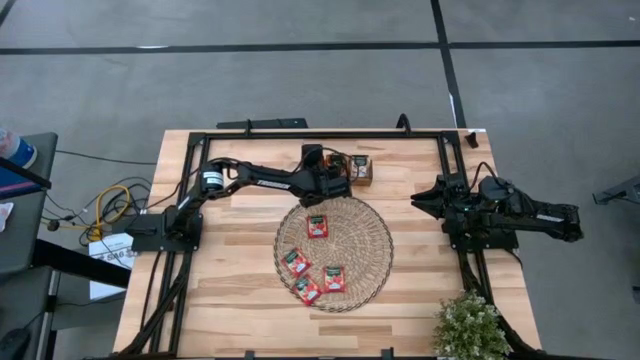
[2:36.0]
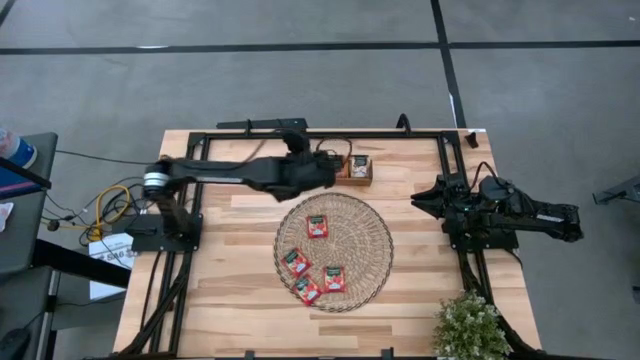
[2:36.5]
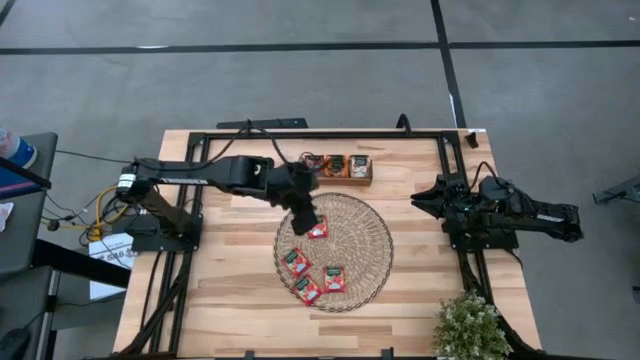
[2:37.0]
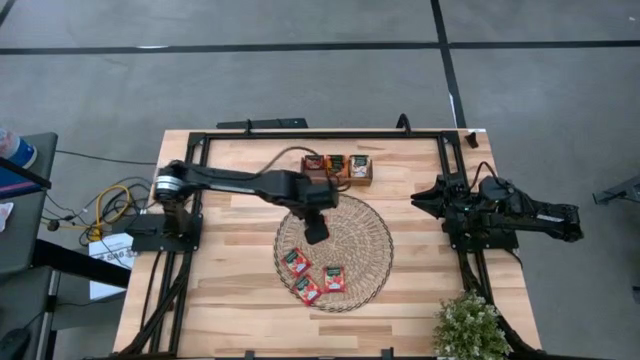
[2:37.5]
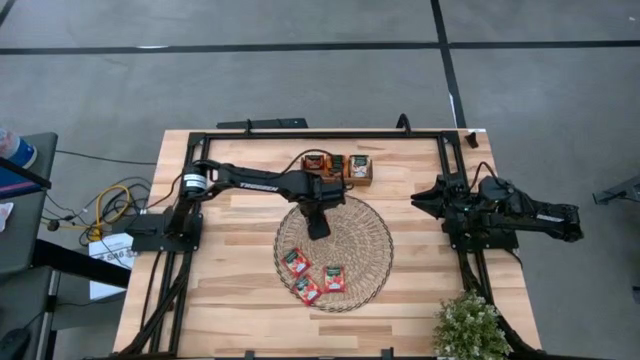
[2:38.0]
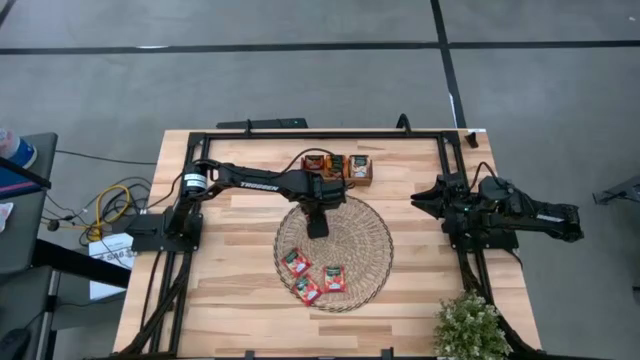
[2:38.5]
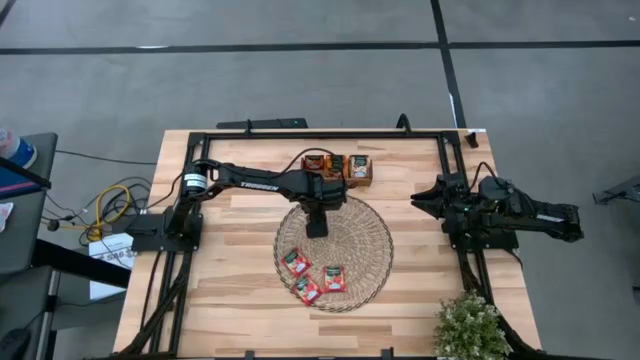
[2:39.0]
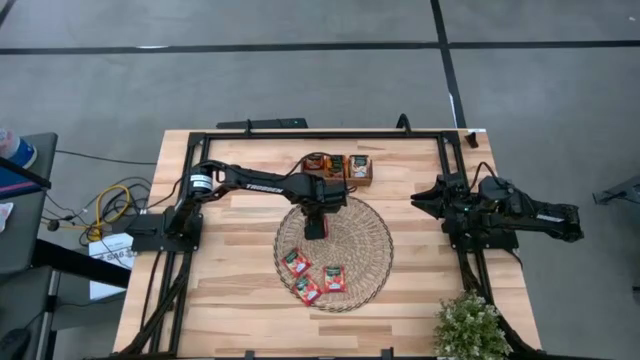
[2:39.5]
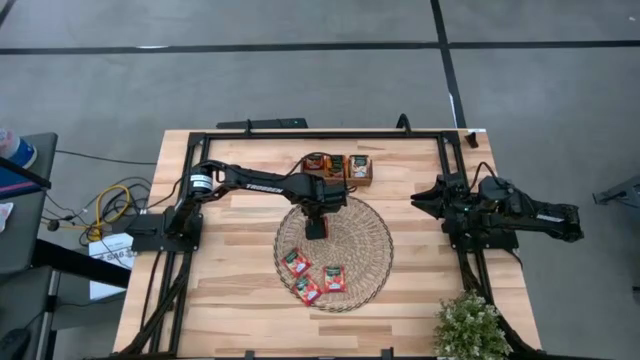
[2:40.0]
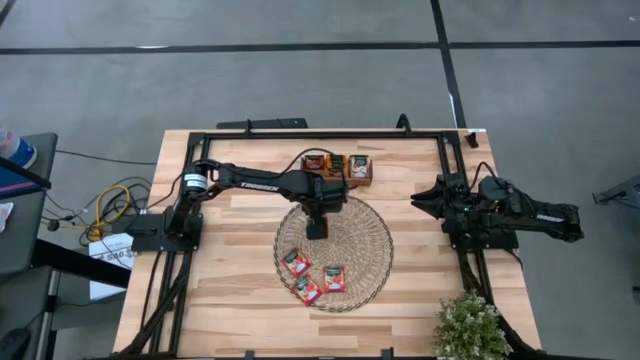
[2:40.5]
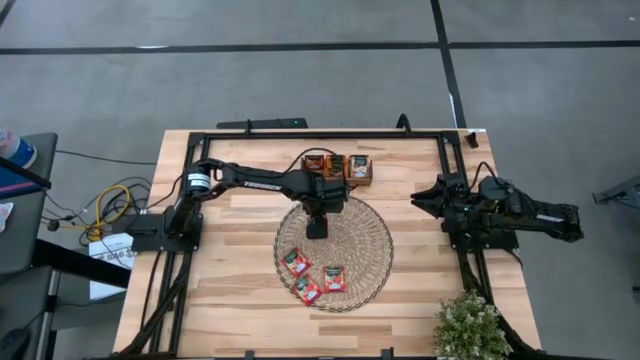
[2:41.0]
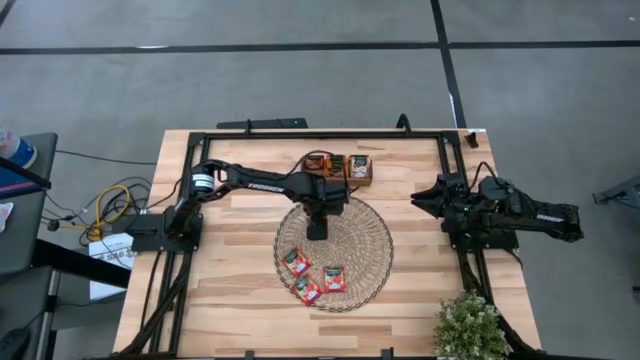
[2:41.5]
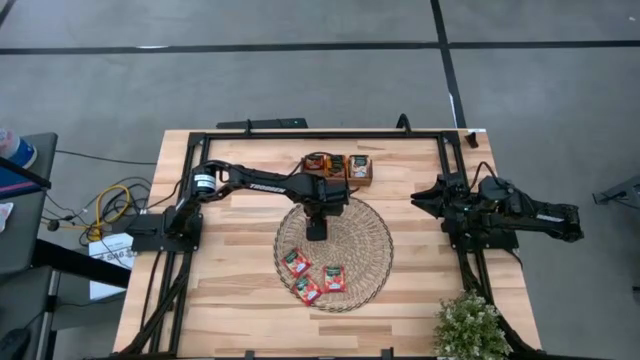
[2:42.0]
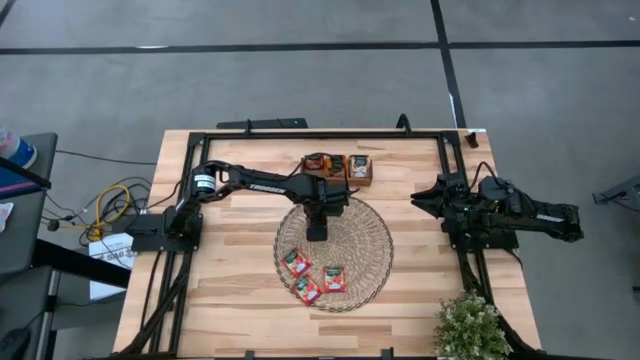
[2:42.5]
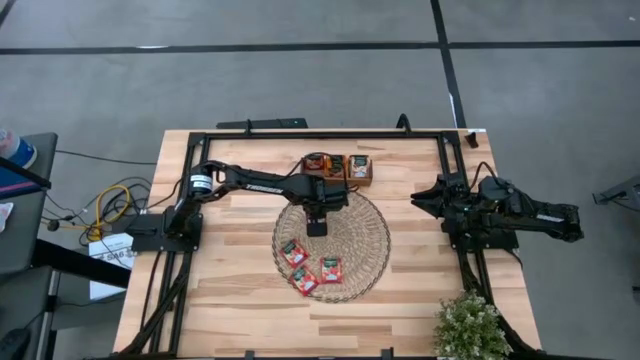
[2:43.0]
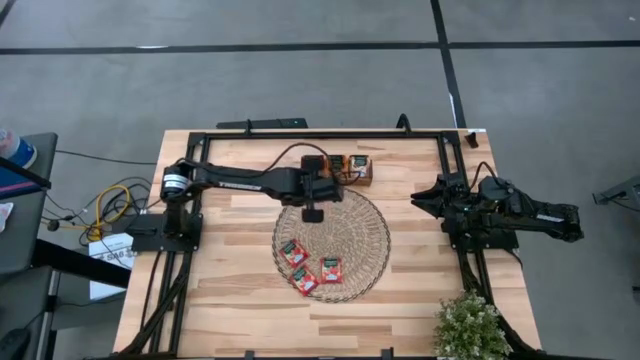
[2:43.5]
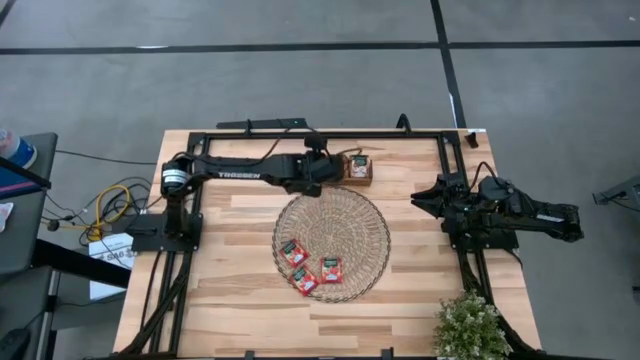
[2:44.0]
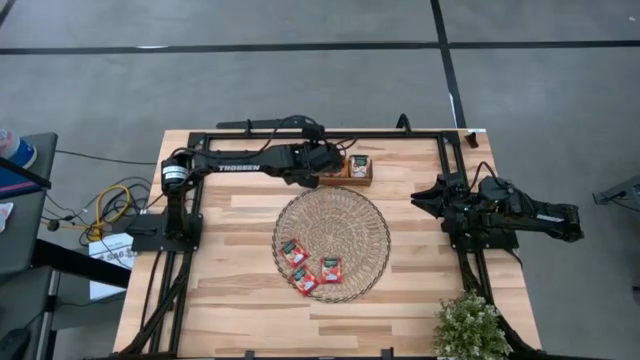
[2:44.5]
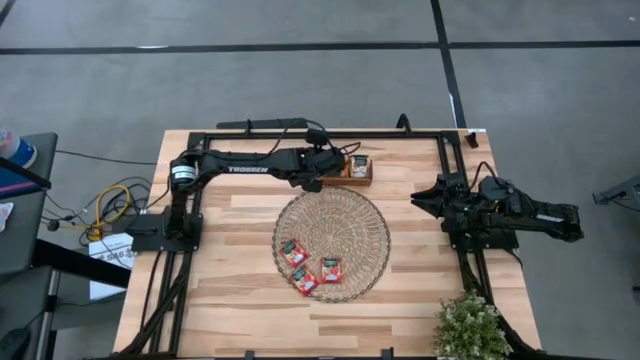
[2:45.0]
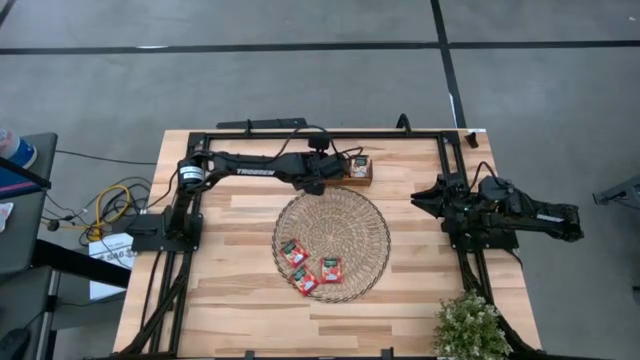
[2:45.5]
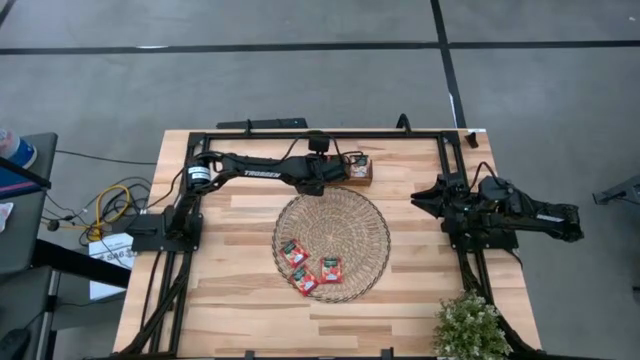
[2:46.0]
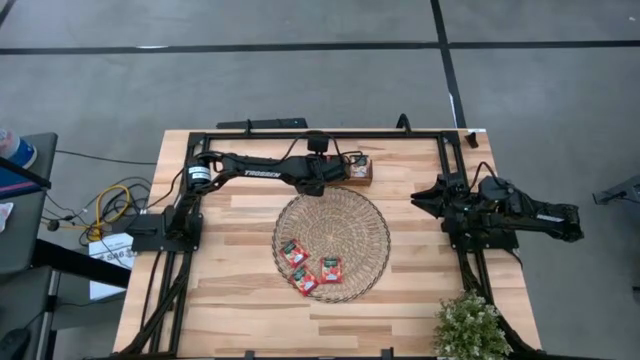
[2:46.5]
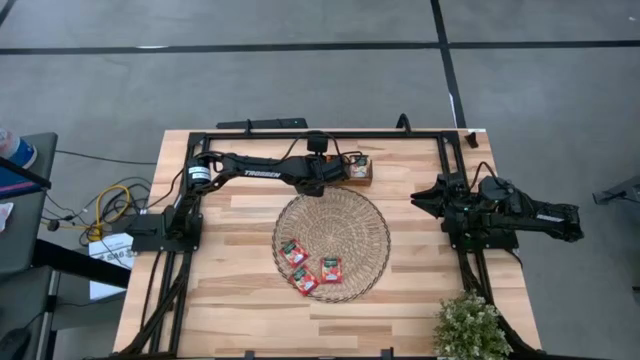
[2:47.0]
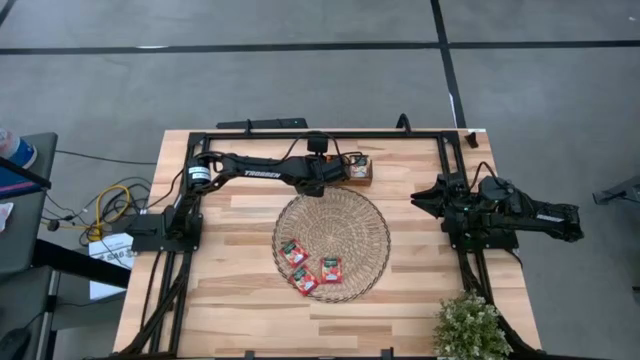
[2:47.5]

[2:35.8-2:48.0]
Task: Pick & Place Tea
Put the red tea bag into the left slot of the wooden organizer

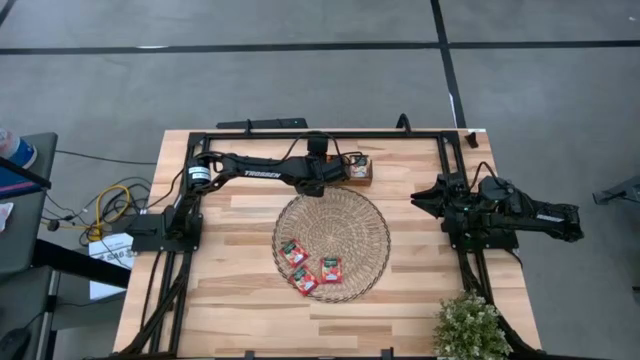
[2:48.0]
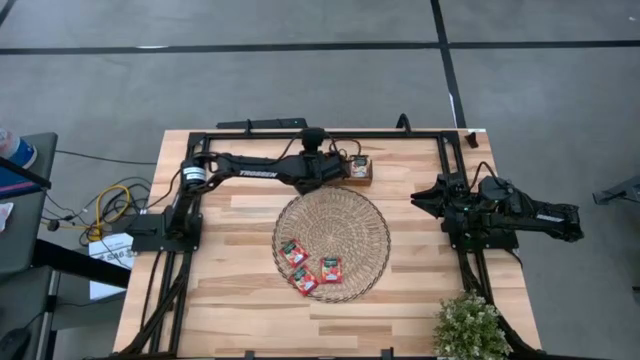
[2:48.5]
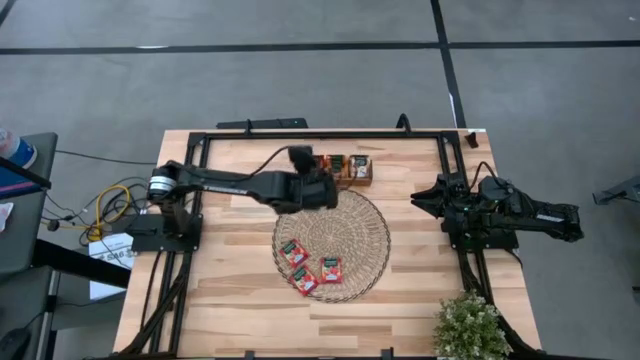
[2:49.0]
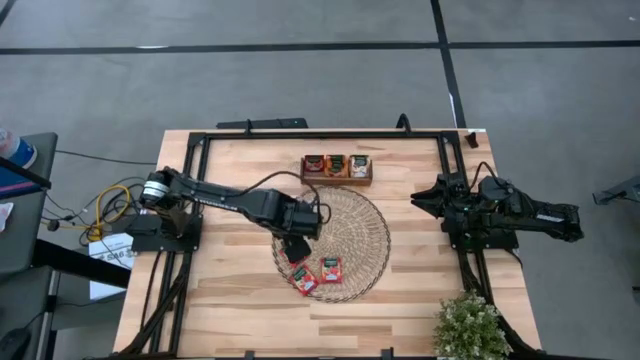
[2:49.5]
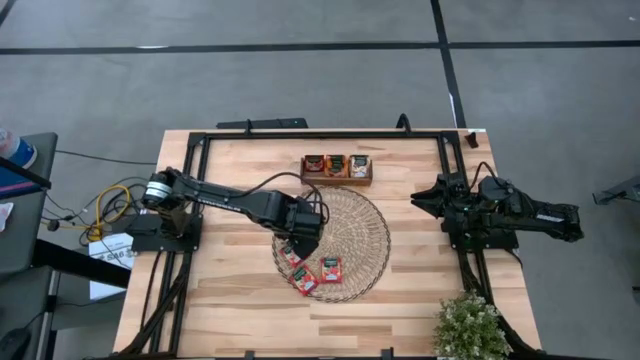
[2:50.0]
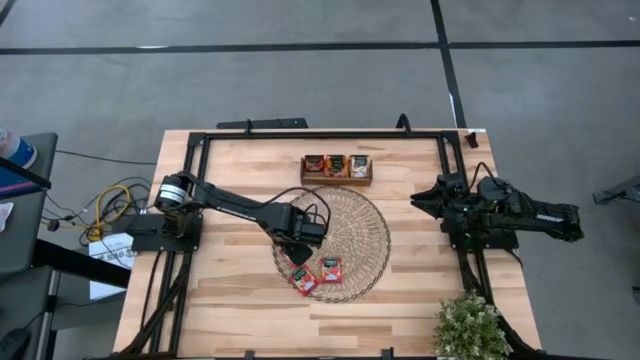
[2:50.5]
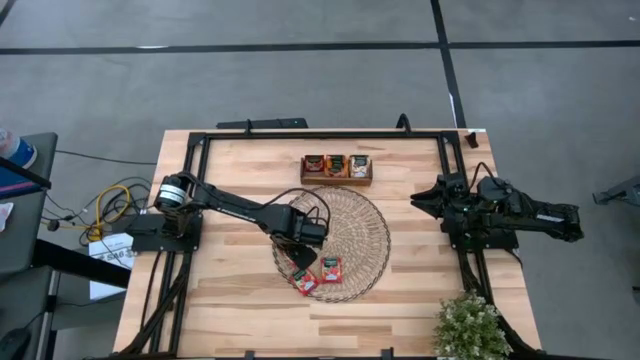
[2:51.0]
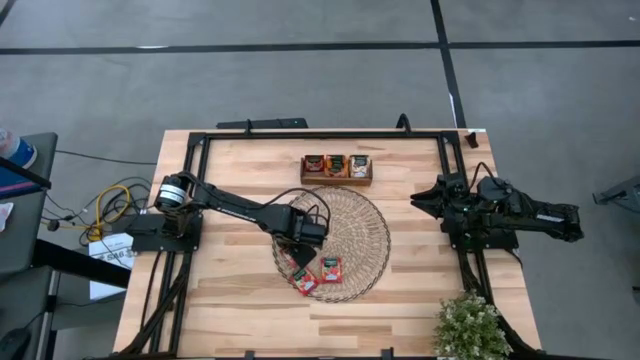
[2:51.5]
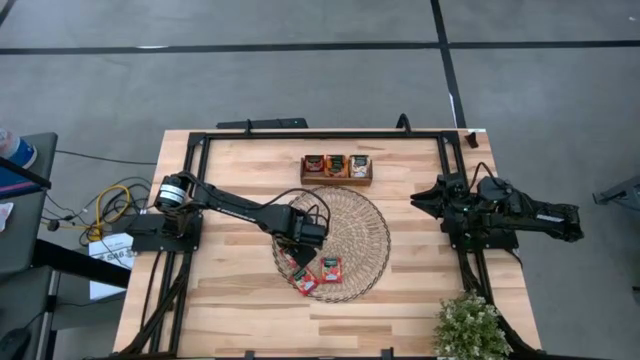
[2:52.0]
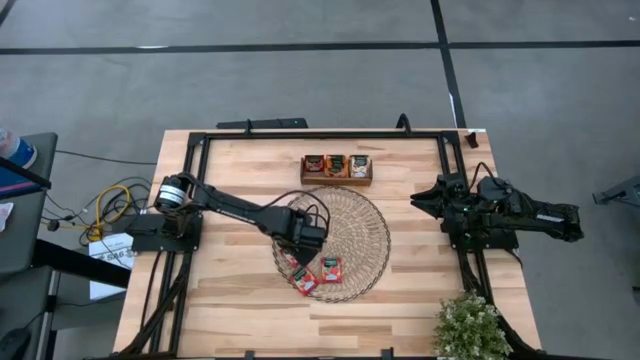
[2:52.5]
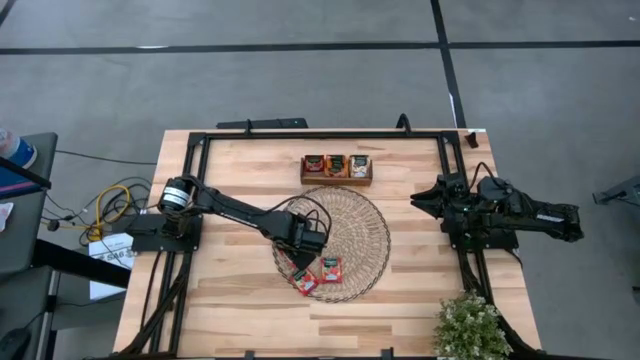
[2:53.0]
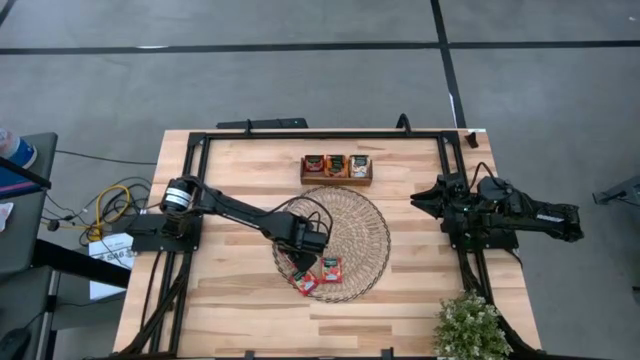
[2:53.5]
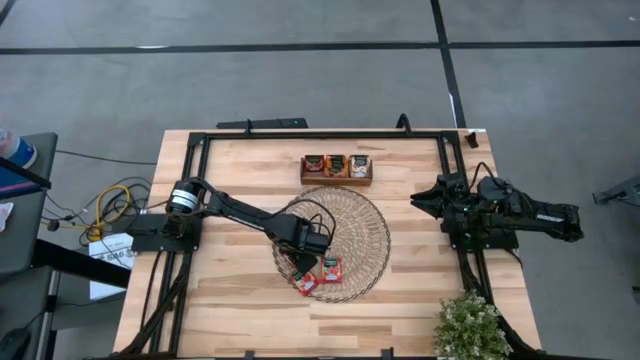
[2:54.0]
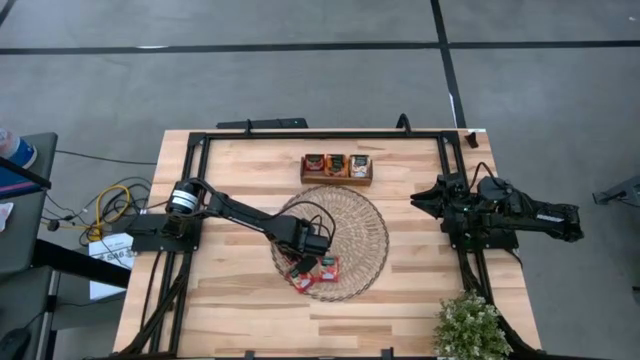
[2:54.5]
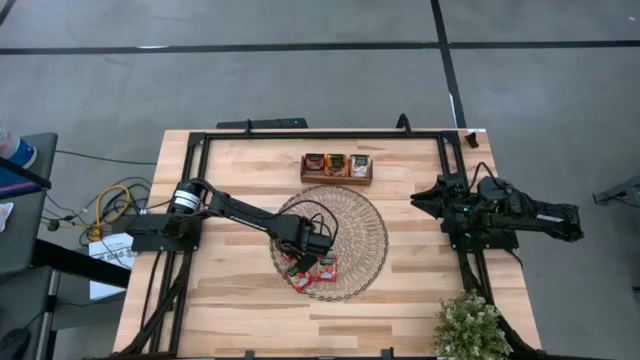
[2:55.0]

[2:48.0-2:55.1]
Put the top red tea bag into the left slot of the wooden organizer

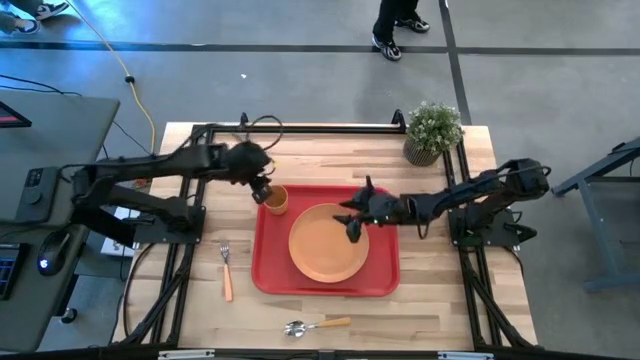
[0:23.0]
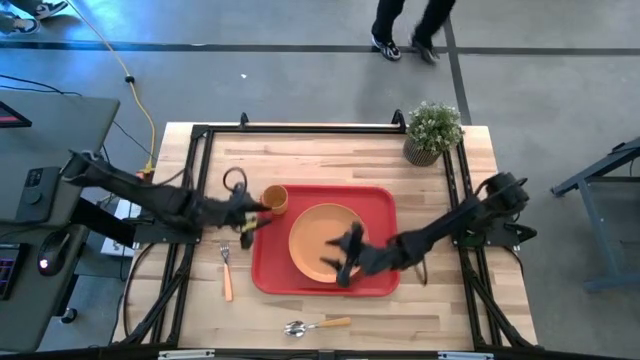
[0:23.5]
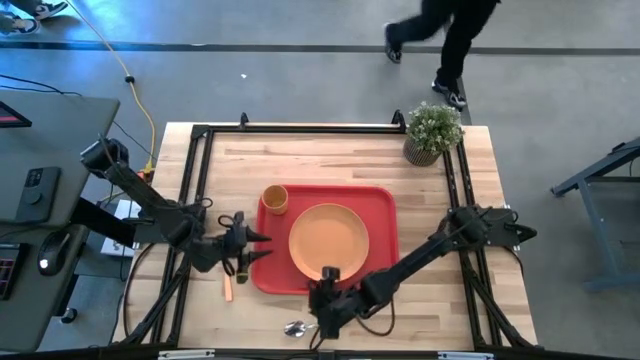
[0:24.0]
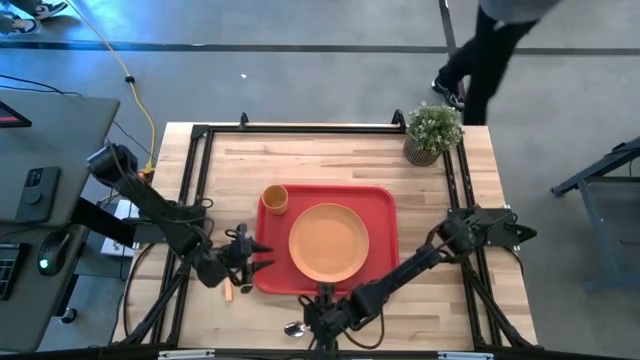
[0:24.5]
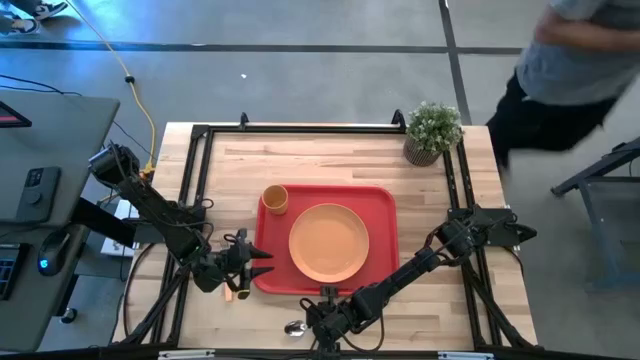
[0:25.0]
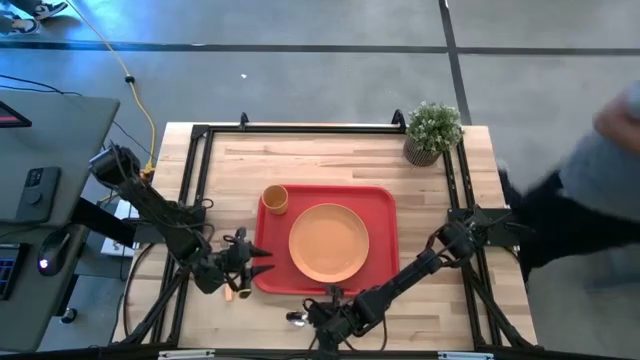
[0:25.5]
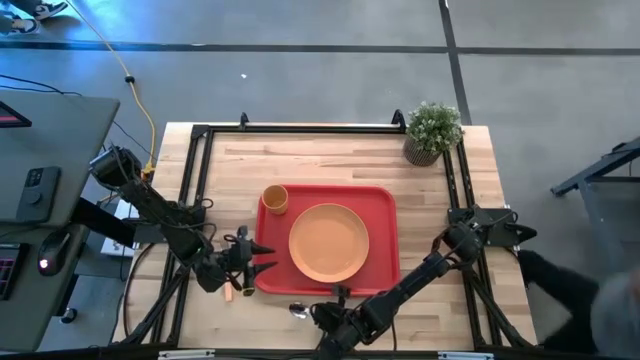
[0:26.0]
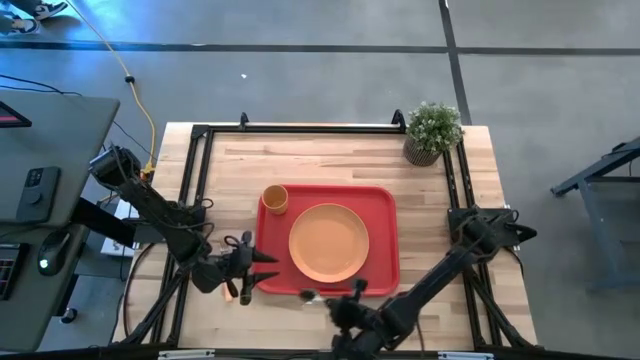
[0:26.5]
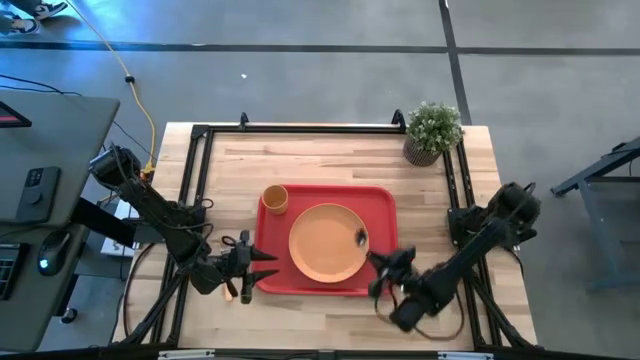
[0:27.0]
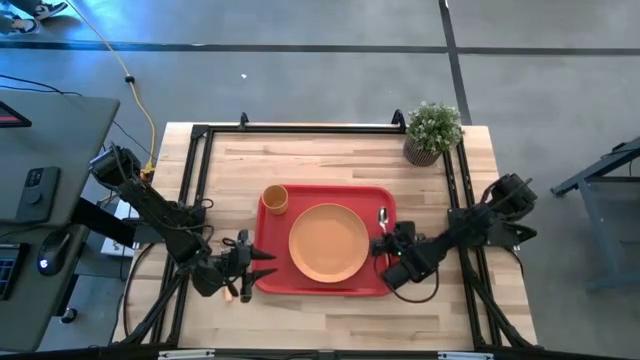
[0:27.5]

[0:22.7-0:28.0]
Task: Pick and place plate/cup/fork/spoon on tray
Put the orange spoon on the red tray to the right of the orange plate
